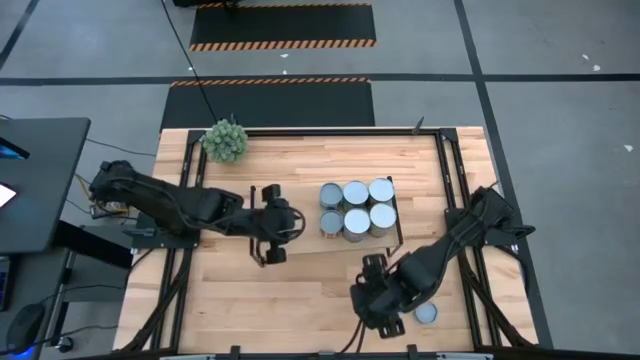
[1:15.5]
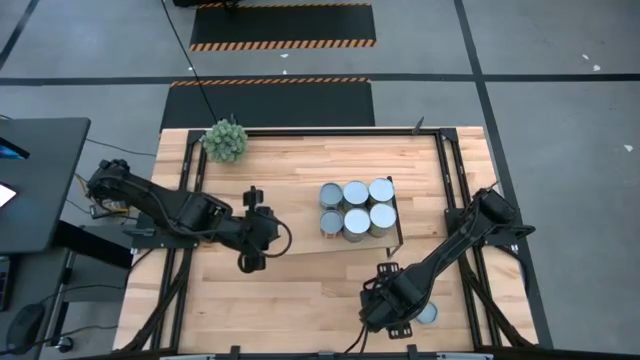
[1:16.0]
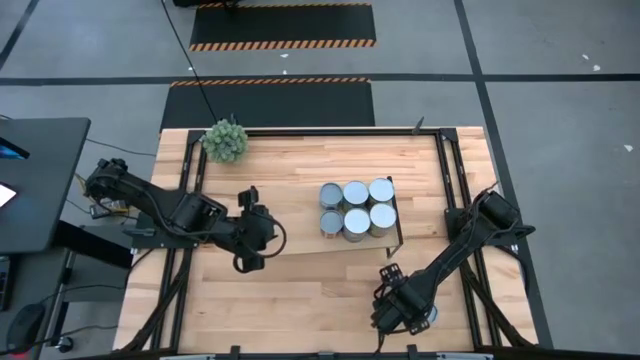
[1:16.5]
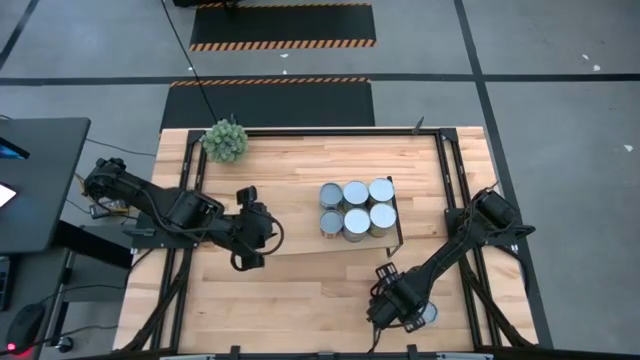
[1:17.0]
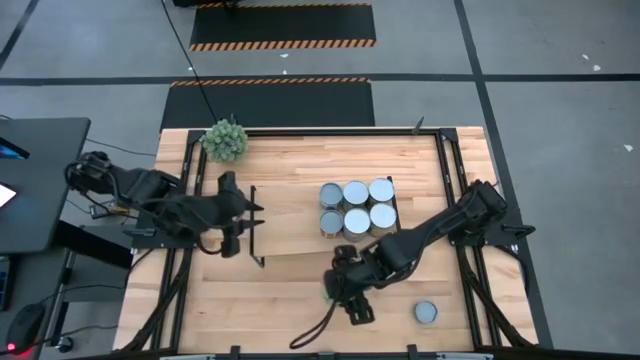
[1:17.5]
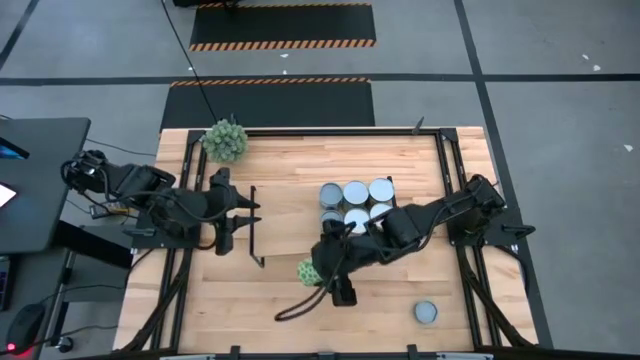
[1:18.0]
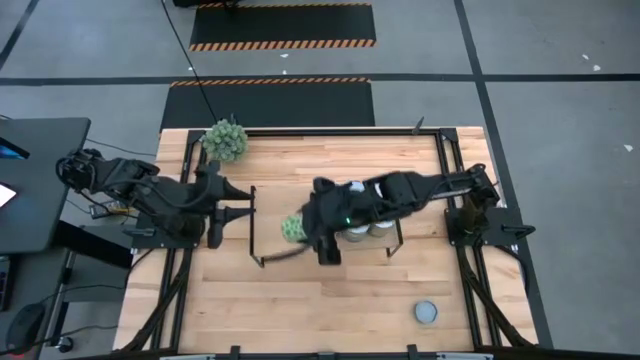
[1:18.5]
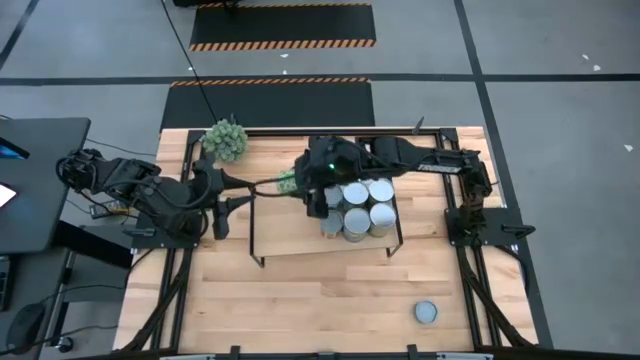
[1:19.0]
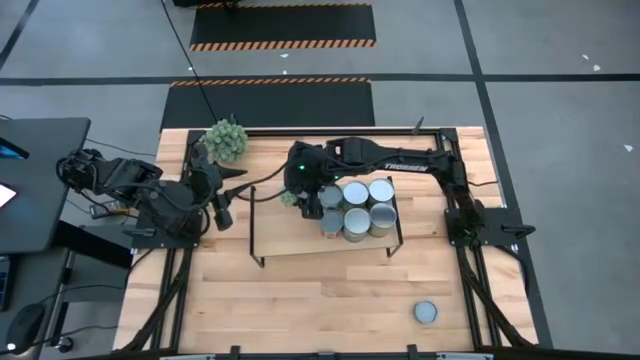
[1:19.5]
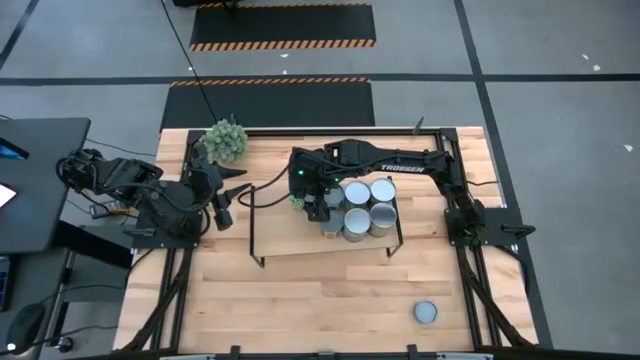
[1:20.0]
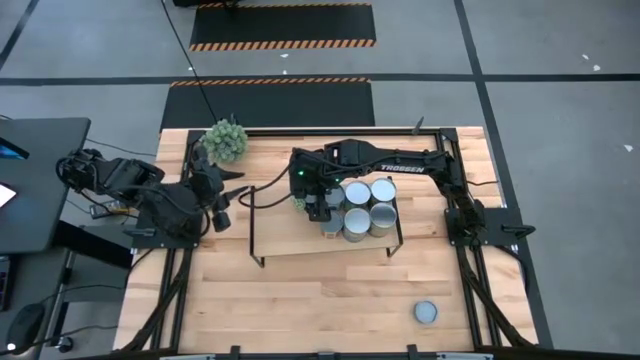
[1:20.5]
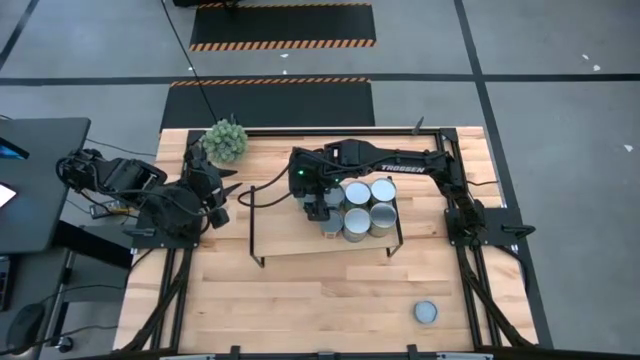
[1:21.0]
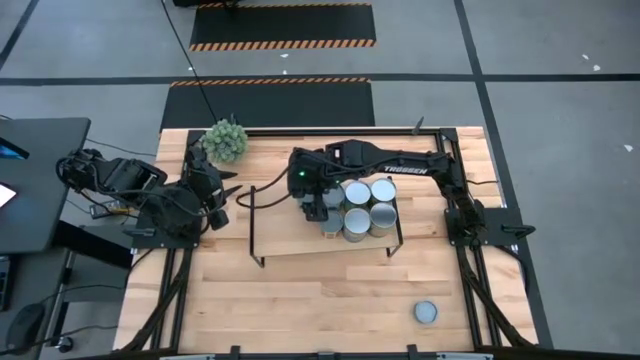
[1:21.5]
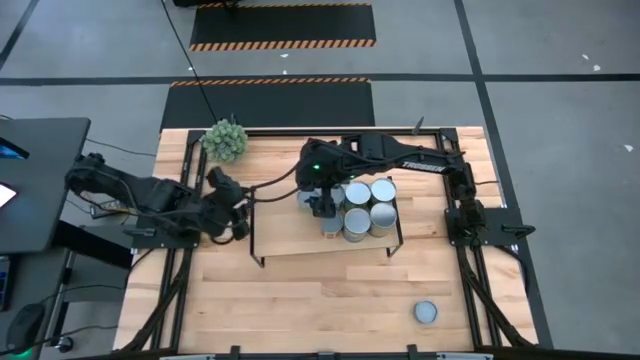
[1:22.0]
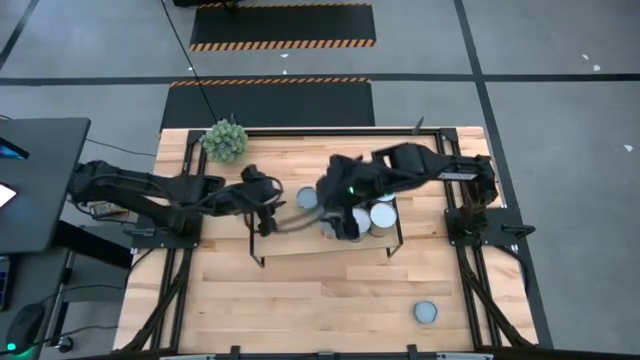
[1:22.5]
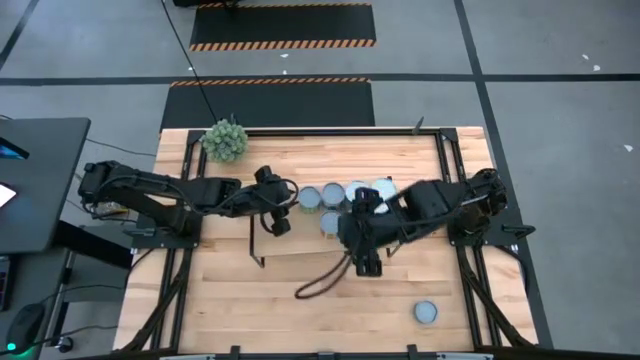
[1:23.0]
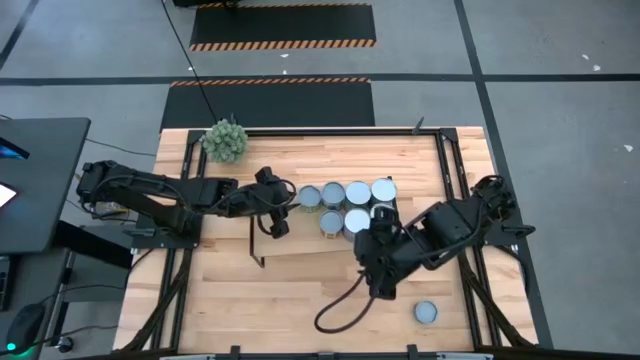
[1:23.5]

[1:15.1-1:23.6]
Task: Pick and place cans onto a shelf
Put the canned green peas on the shelf

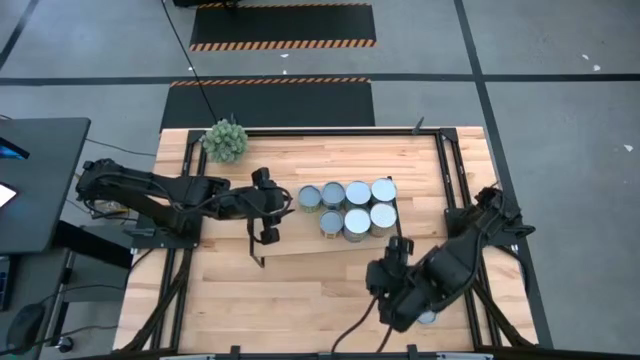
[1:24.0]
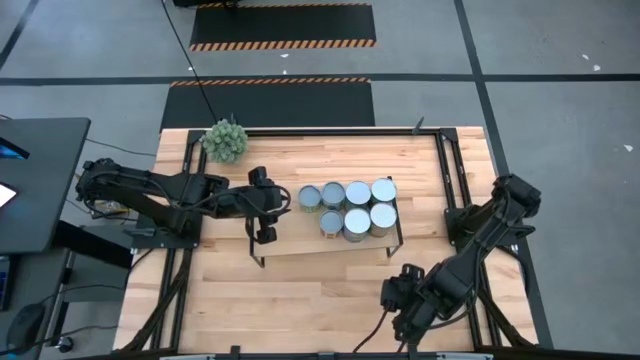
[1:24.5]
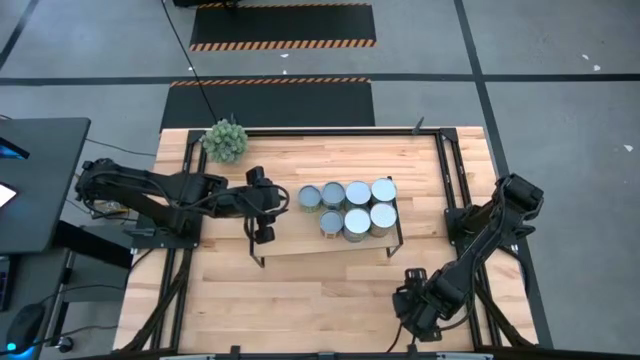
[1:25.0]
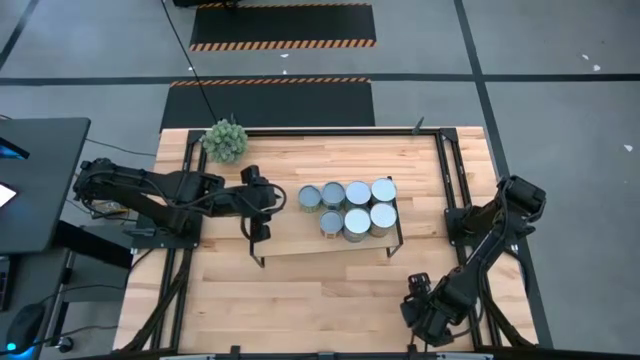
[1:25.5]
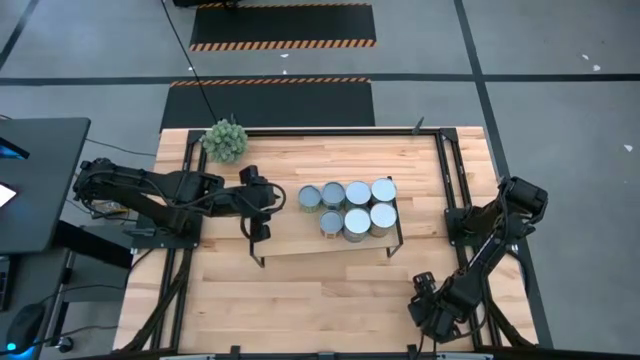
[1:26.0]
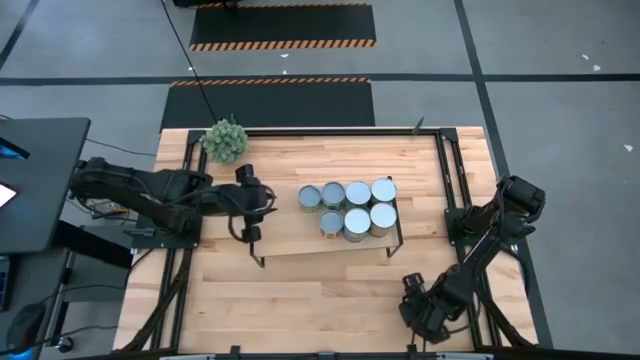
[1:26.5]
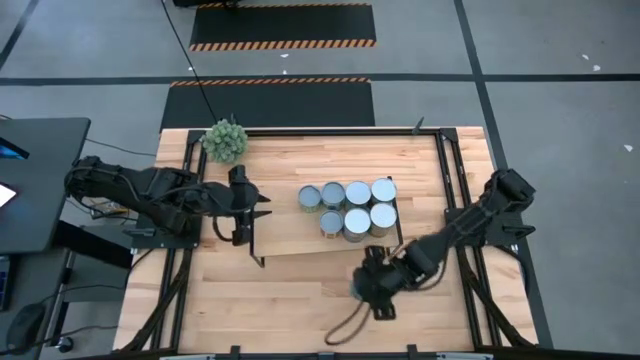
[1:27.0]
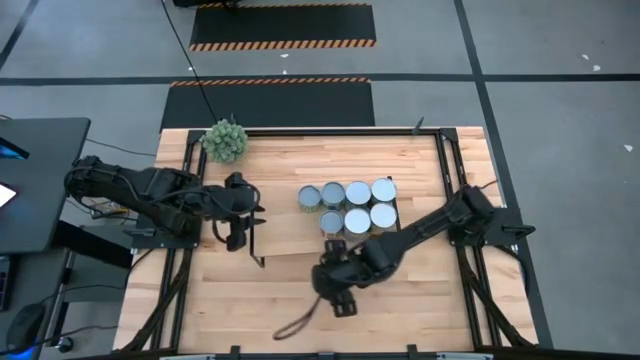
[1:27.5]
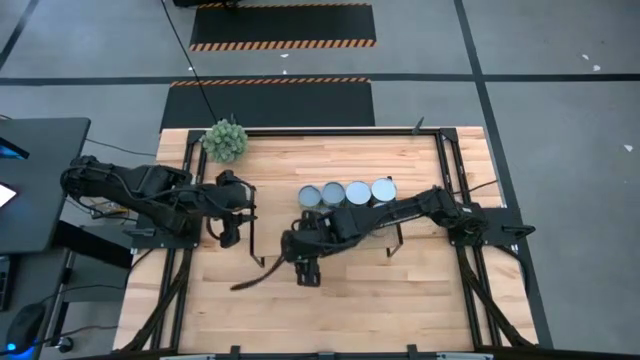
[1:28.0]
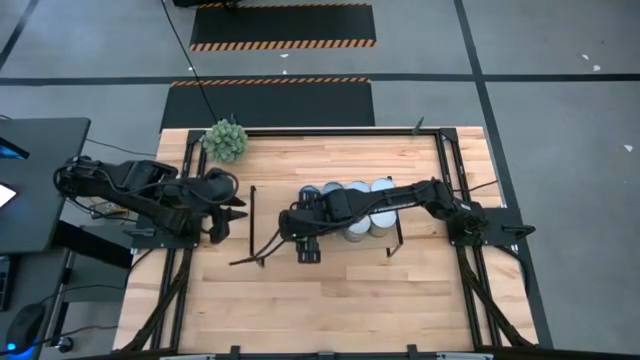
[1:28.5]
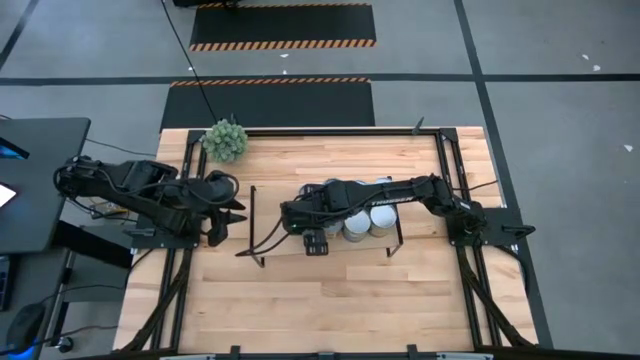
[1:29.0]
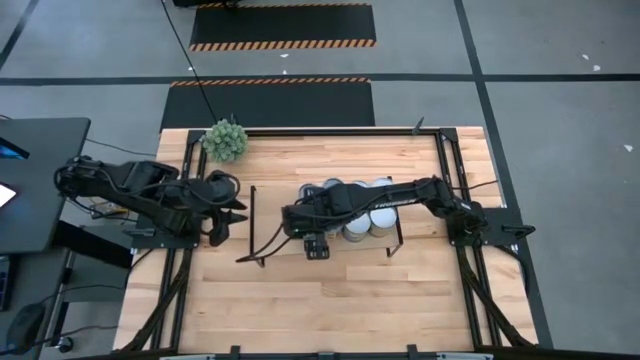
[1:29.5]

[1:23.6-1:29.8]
Put the canned tuna on the shelf

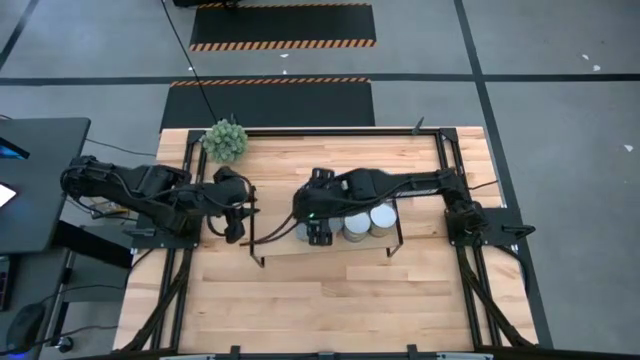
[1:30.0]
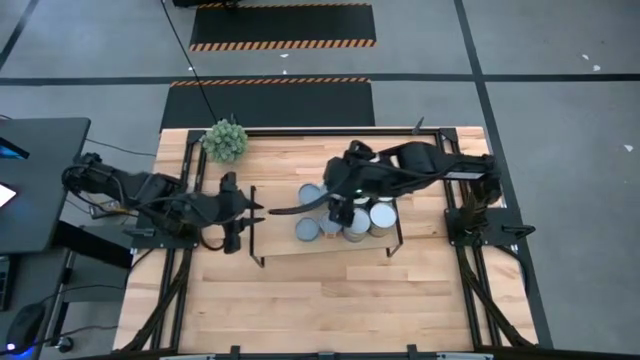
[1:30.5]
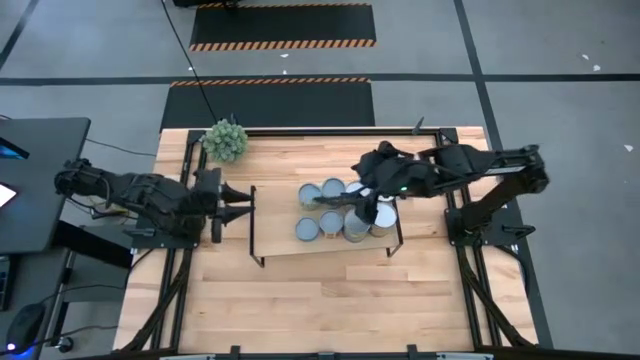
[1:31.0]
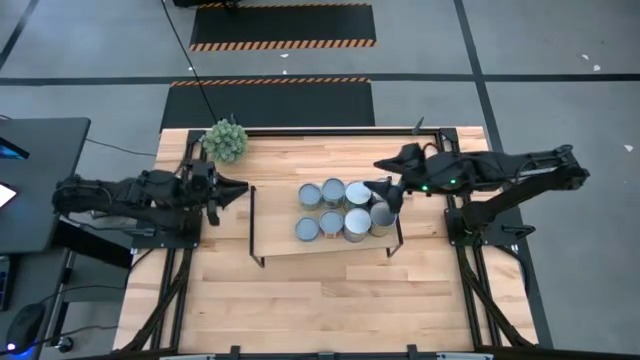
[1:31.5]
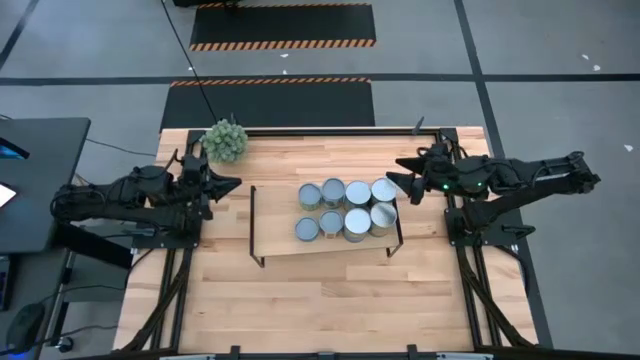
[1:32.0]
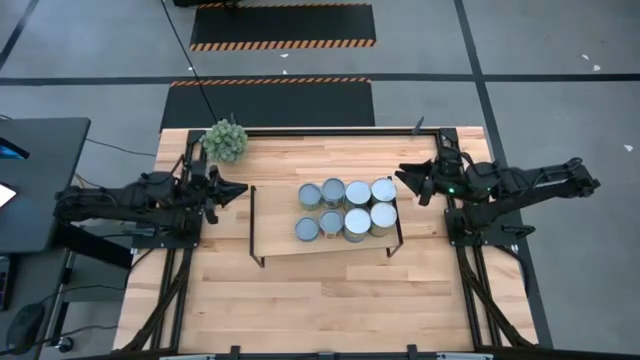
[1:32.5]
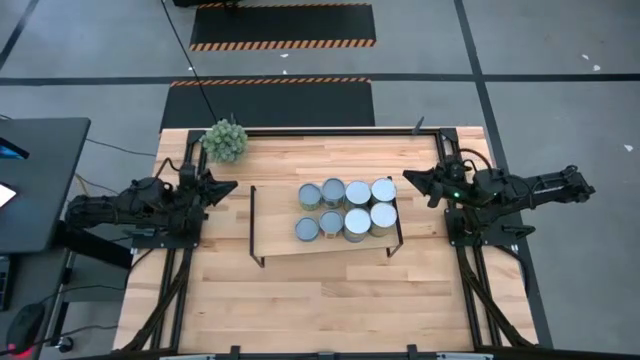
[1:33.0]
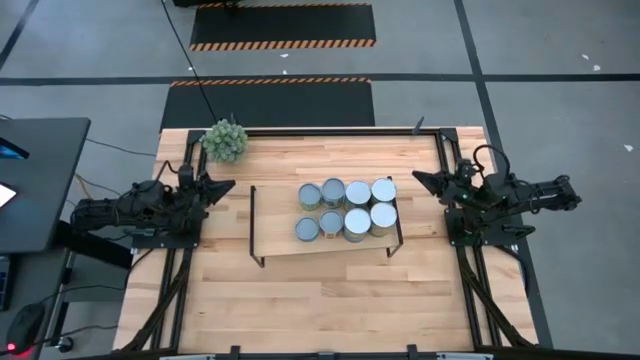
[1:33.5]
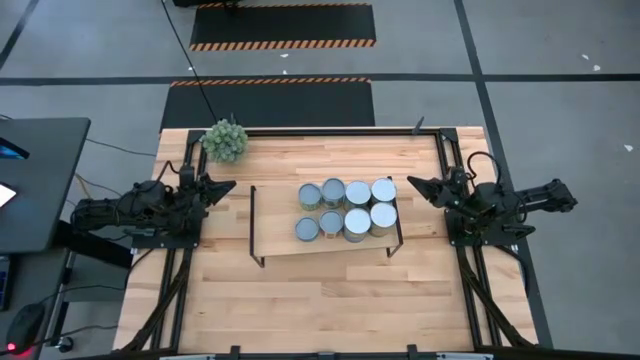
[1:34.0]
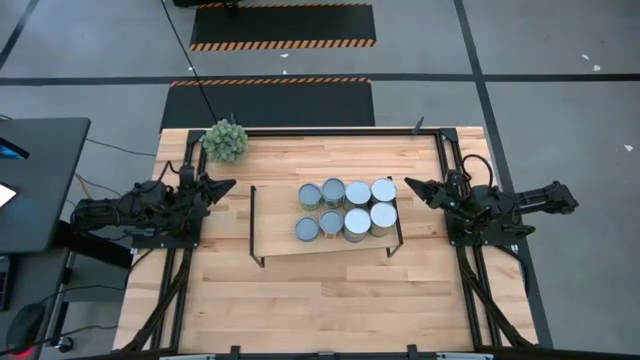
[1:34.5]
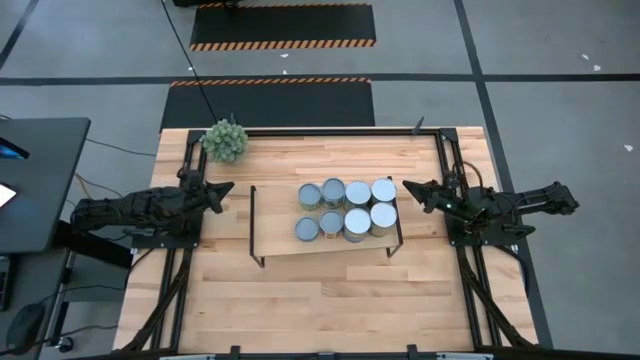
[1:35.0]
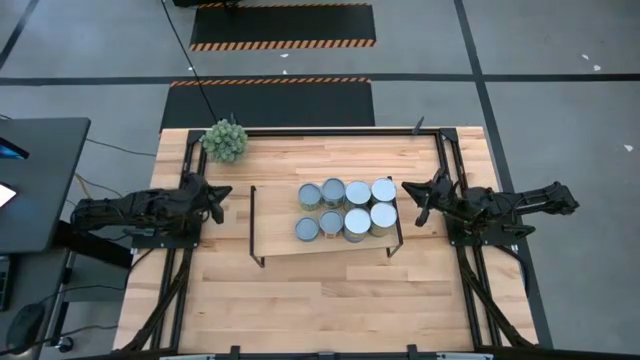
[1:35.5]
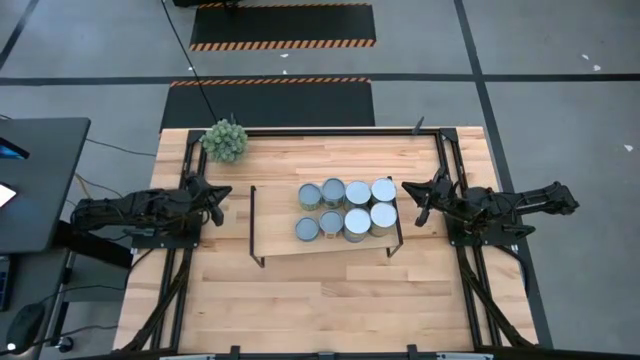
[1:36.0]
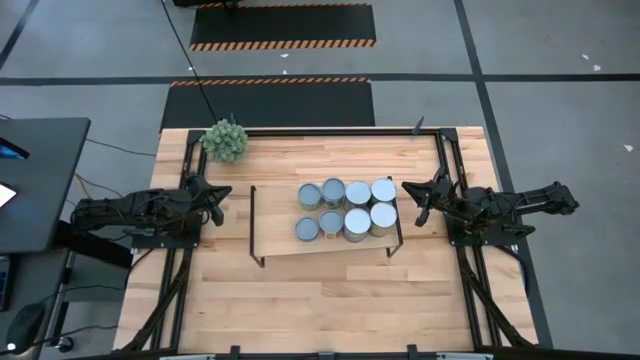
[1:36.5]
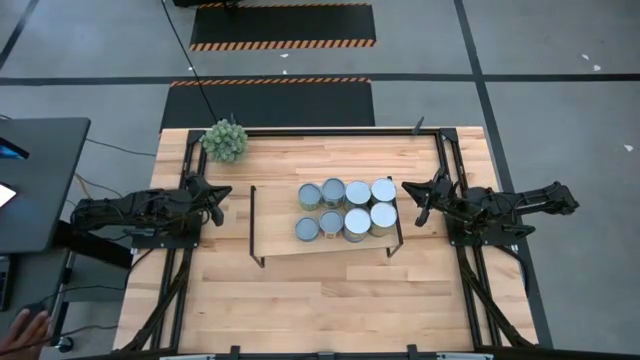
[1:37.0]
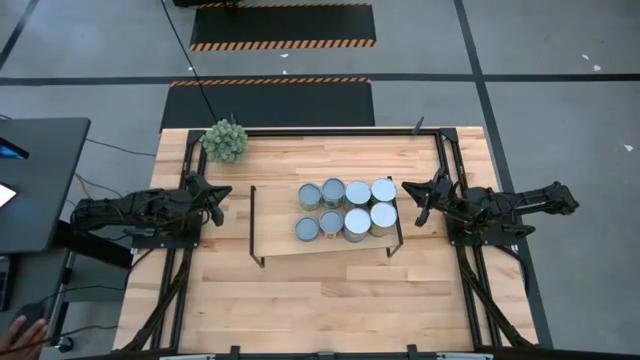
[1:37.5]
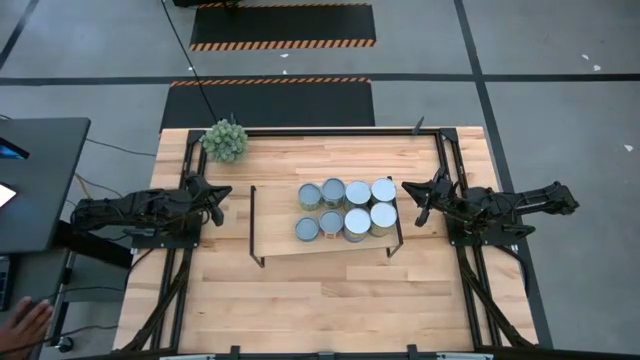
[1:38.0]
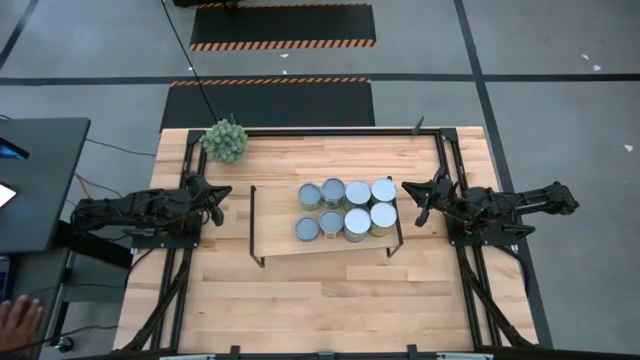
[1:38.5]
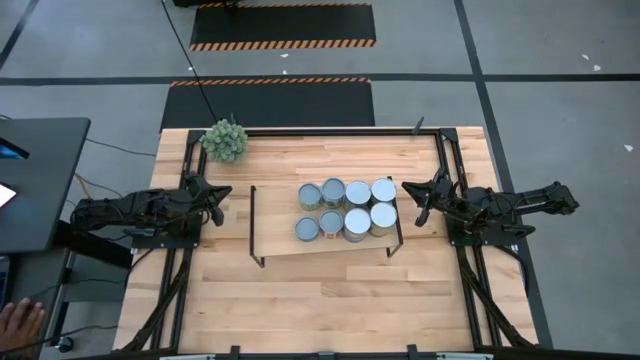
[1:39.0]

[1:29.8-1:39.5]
Return to Home Position
